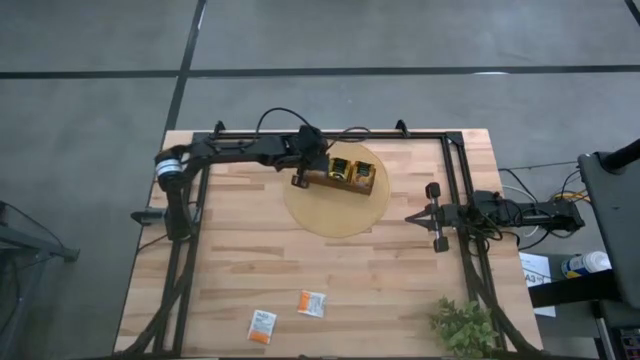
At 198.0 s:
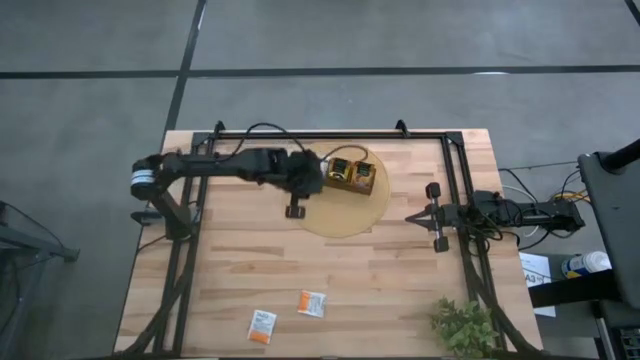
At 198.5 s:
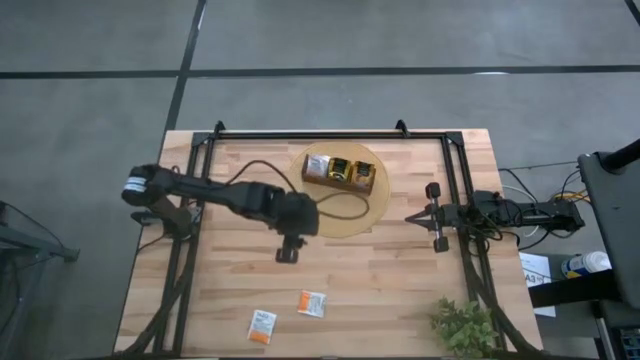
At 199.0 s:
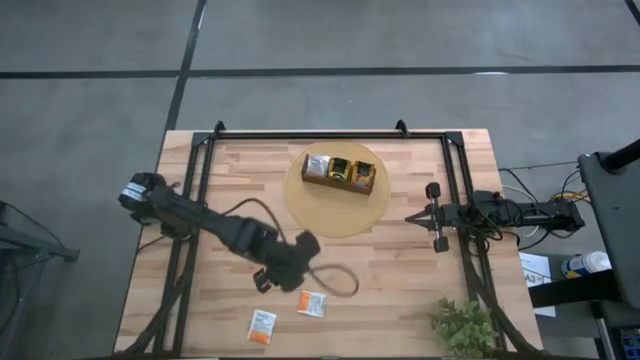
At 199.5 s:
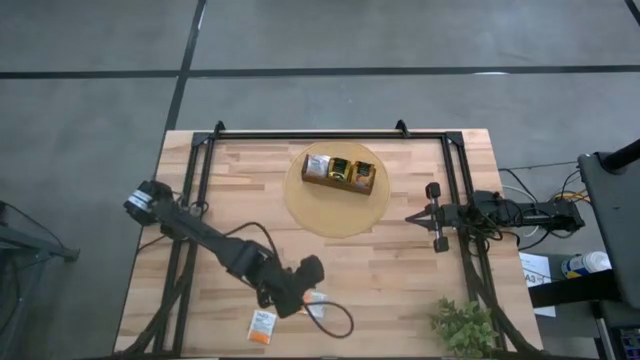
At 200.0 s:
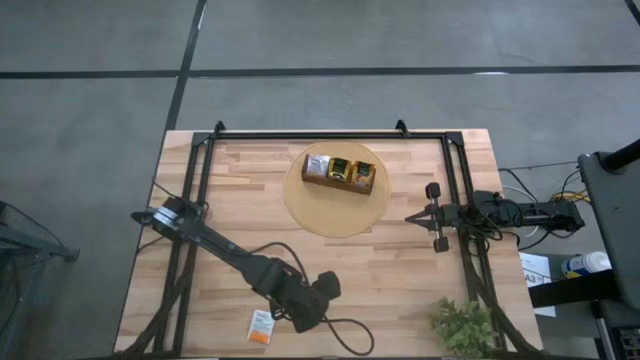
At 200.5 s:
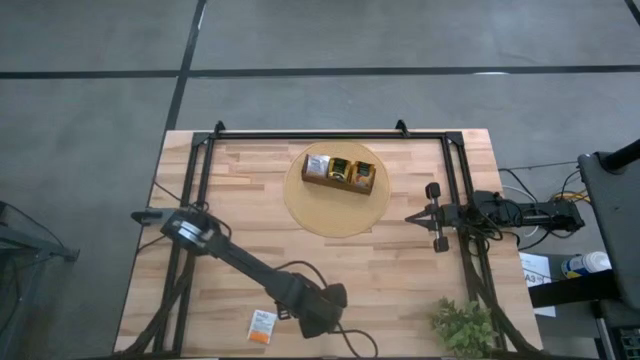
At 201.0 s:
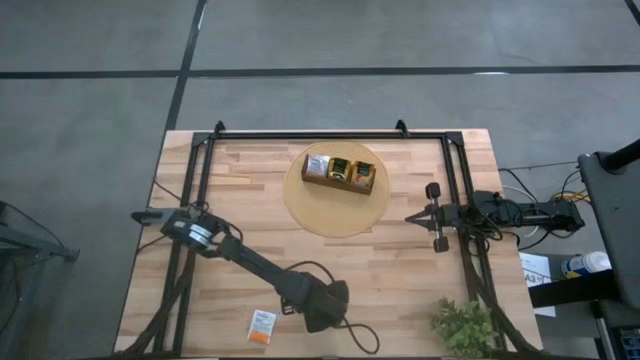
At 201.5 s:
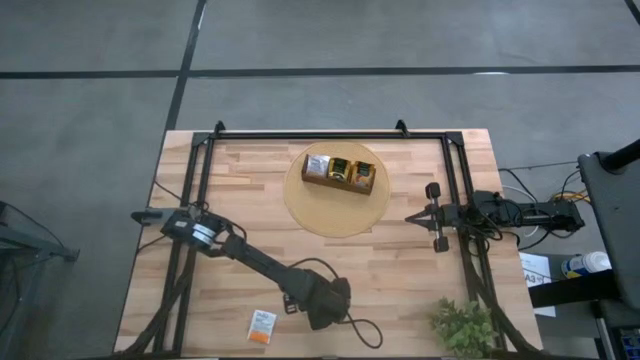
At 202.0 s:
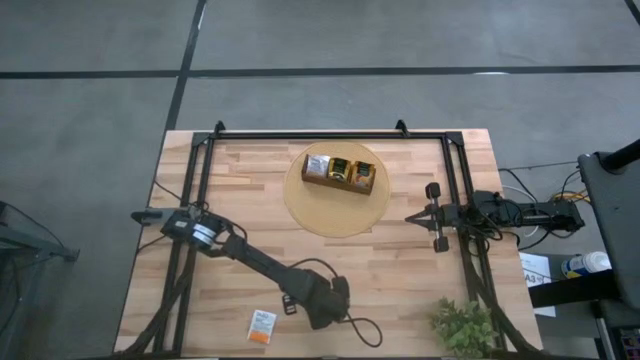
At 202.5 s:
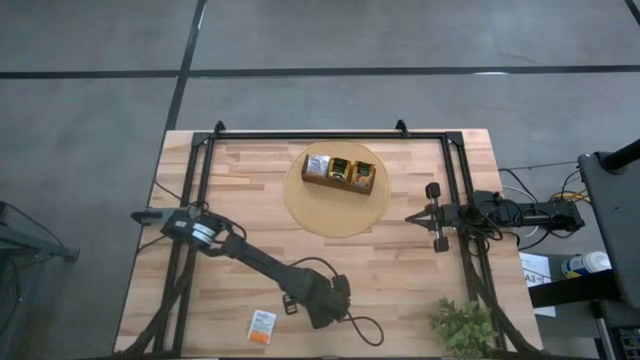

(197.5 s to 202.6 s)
Task: Pick & Place Tea
Put the right white tea bag into the left section of wooden organizer

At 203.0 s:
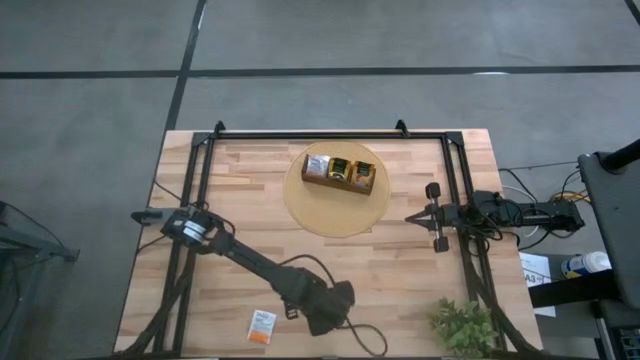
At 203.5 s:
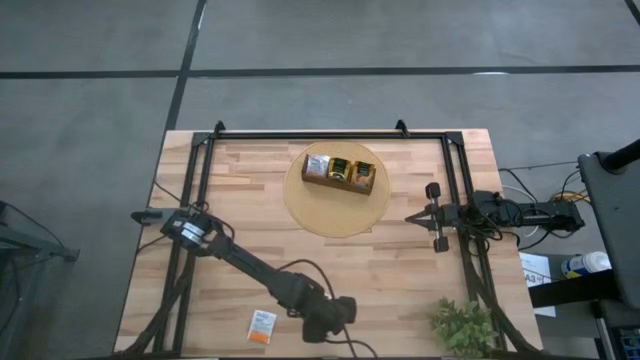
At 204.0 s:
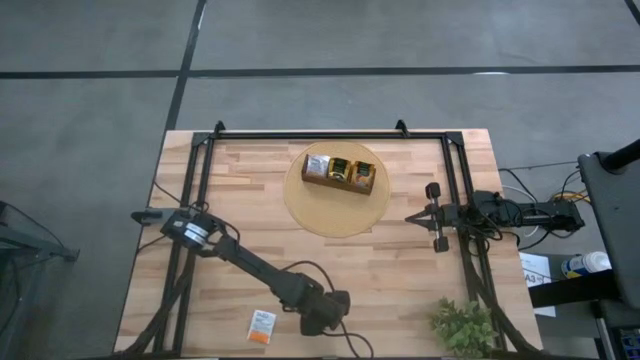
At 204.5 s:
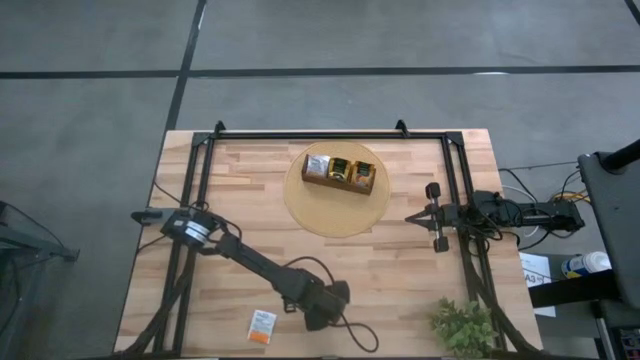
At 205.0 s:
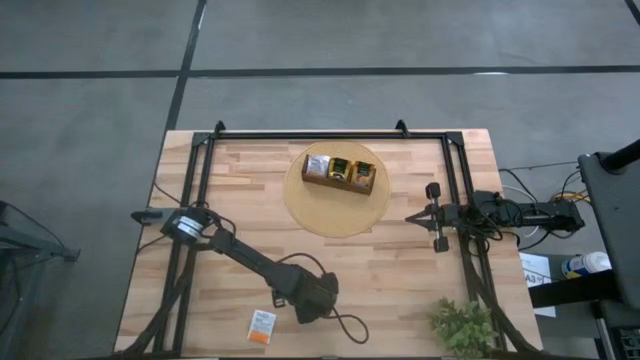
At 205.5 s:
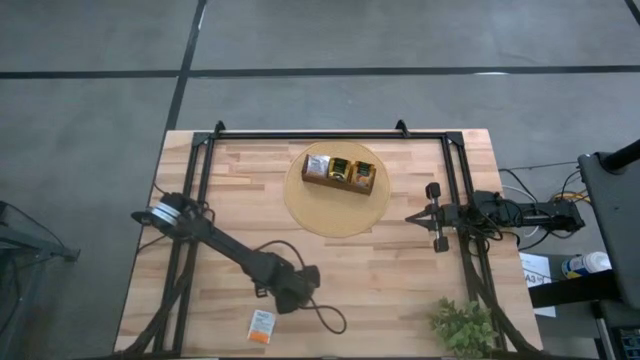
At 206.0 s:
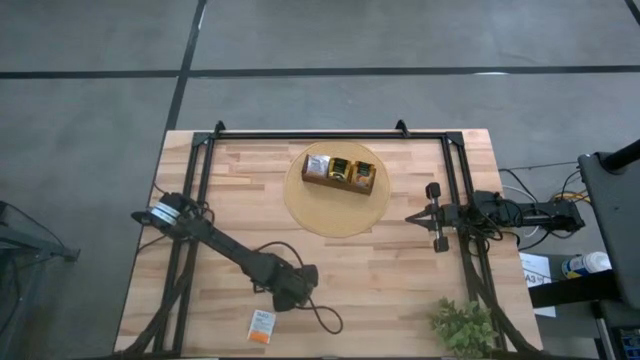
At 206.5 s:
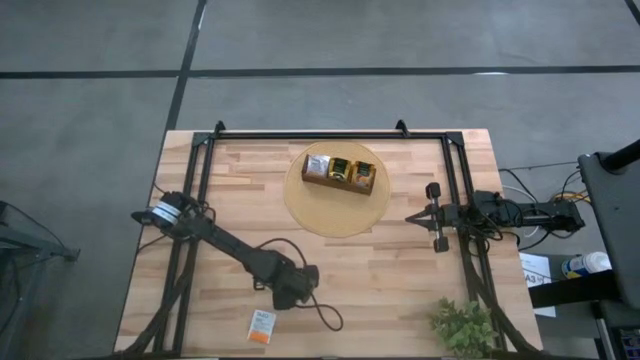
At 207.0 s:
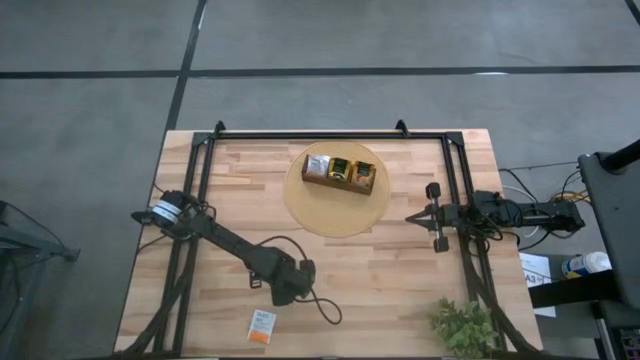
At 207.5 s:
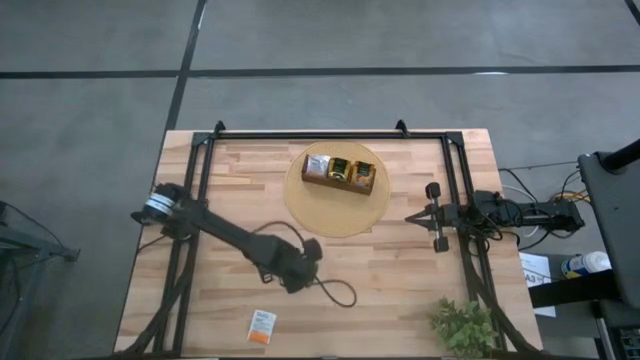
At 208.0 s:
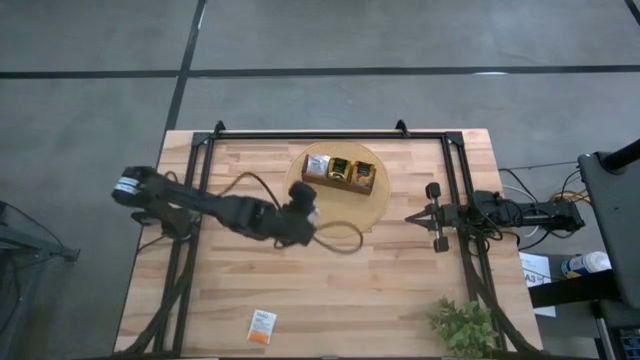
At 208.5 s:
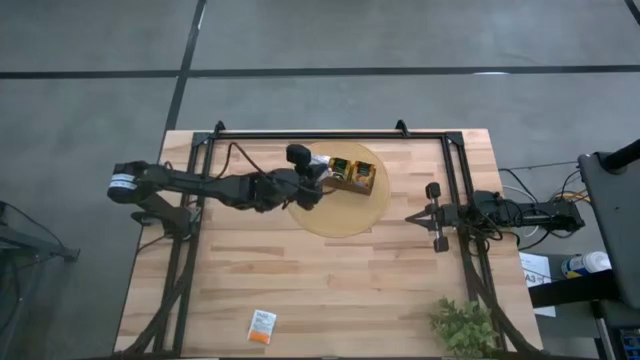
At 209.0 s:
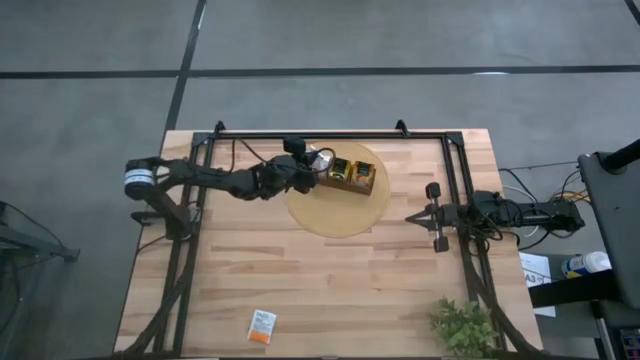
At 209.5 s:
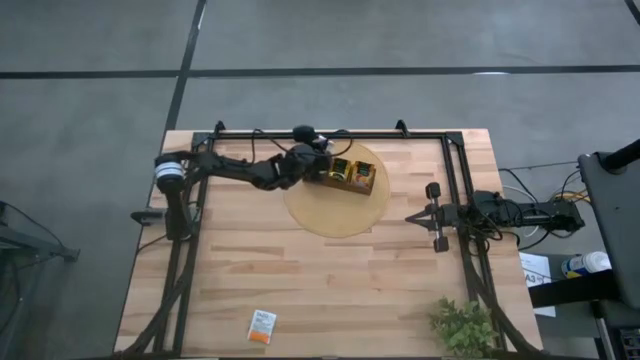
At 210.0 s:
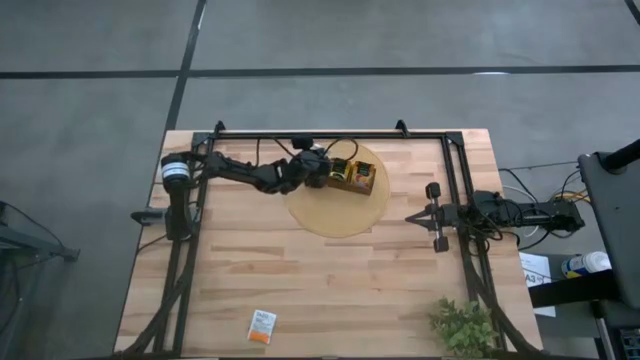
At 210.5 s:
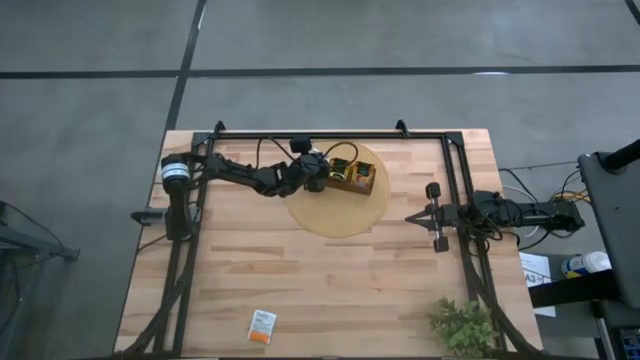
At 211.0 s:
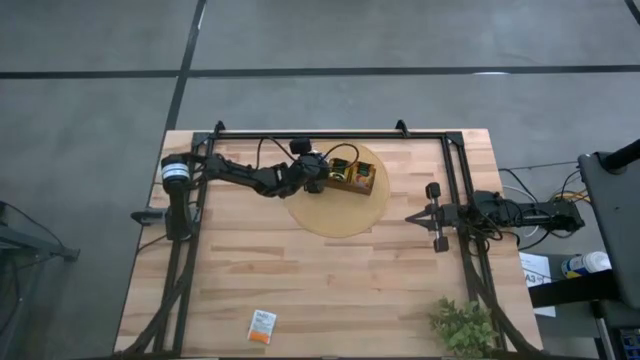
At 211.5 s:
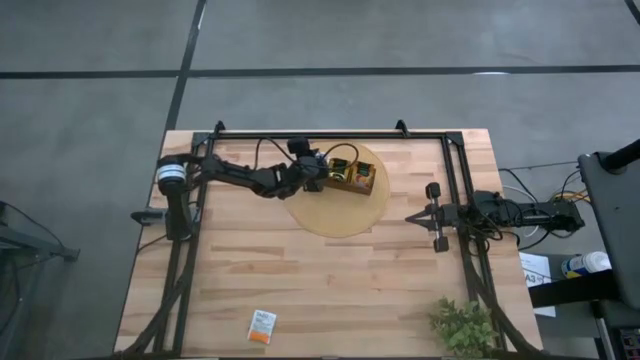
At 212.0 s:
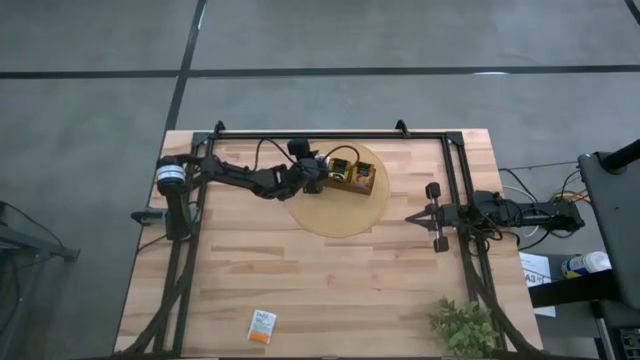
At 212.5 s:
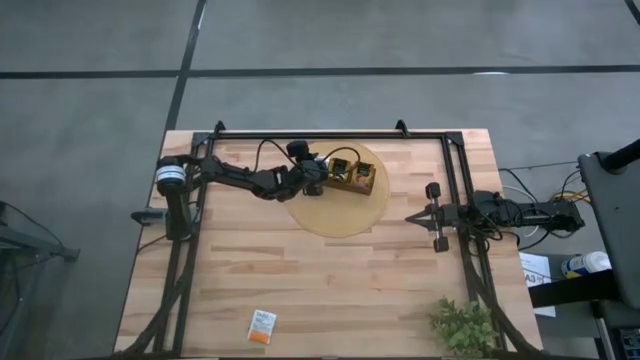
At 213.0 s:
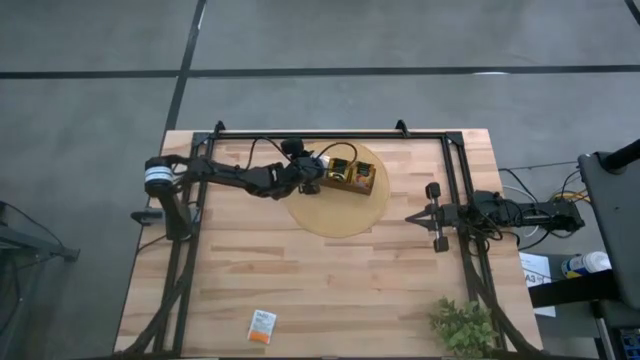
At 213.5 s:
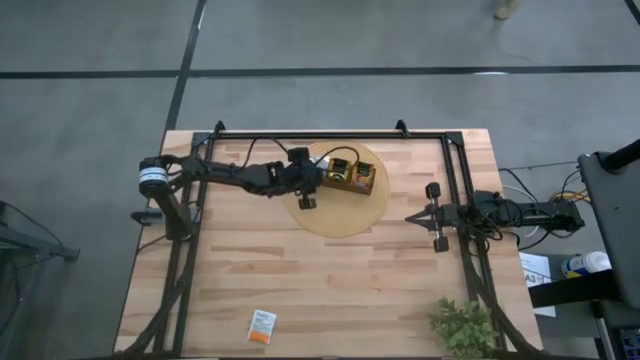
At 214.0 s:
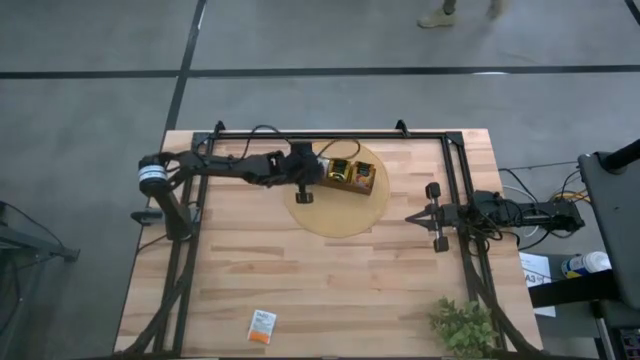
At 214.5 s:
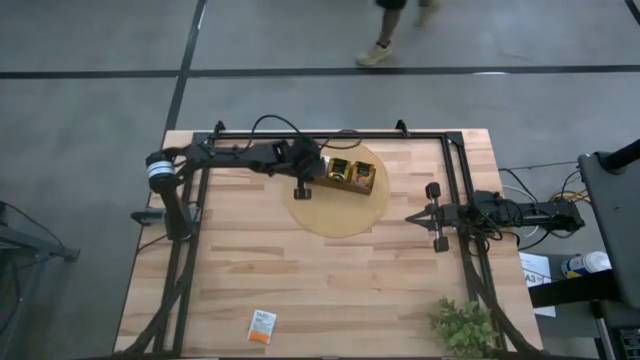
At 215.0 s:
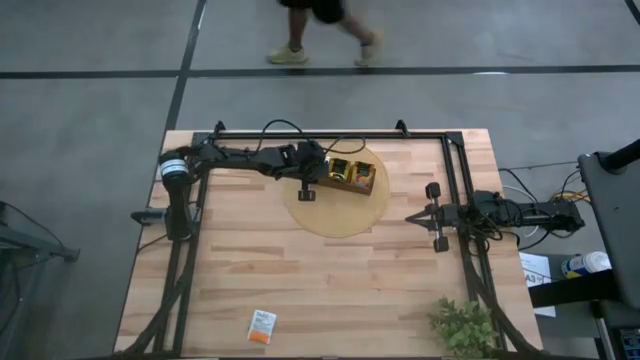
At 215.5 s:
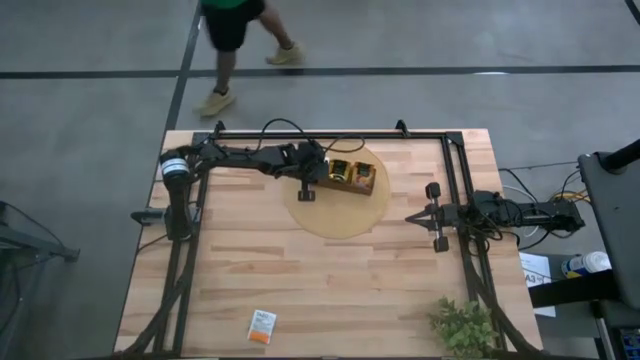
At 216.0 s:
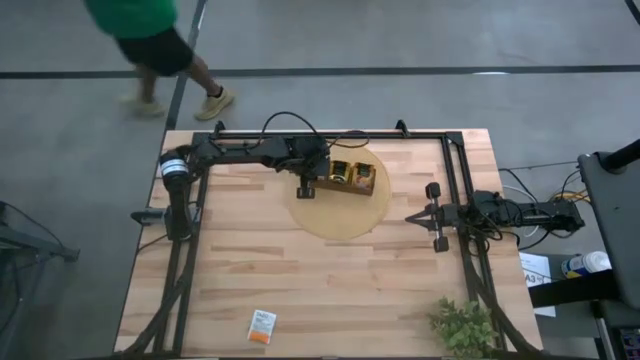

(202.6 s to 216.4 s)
Put the right white tea bag into the left section of wooden organizer

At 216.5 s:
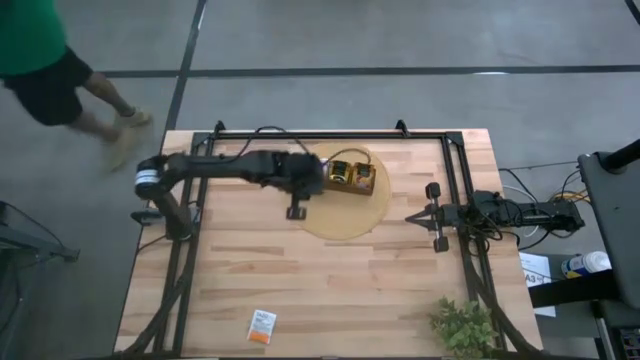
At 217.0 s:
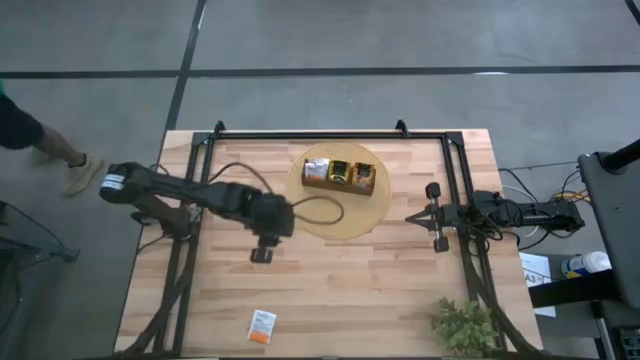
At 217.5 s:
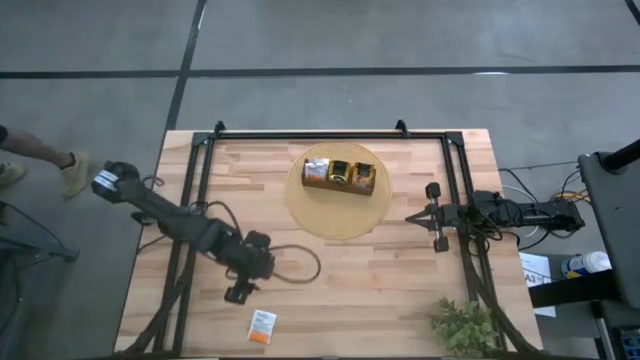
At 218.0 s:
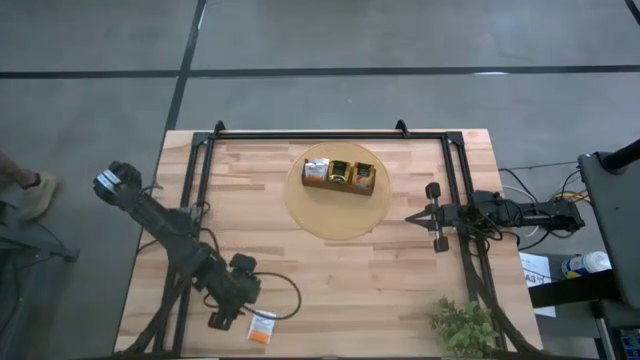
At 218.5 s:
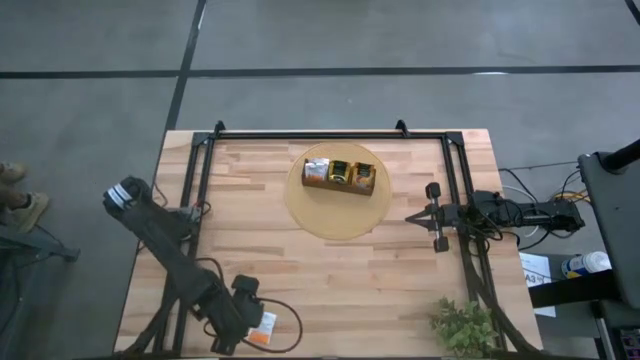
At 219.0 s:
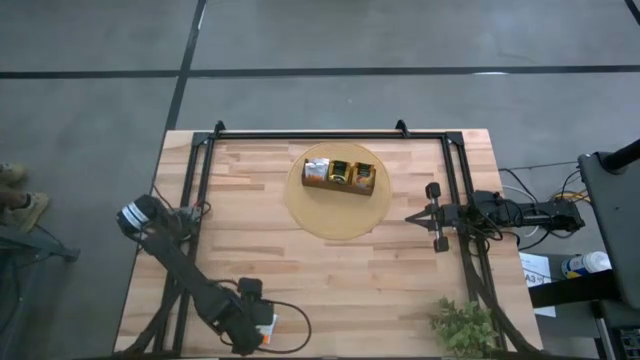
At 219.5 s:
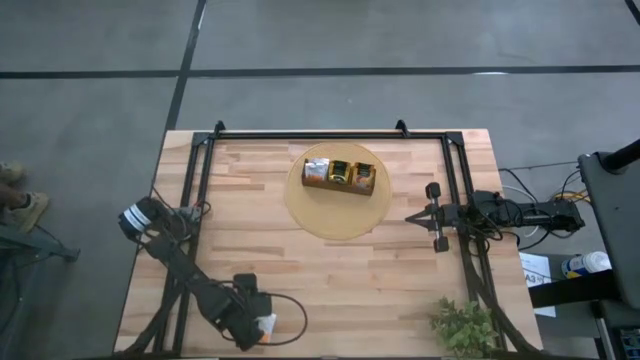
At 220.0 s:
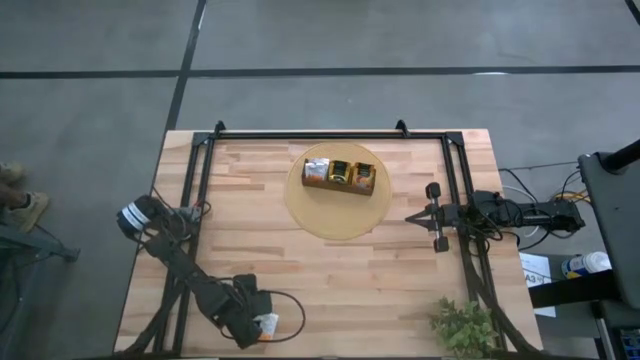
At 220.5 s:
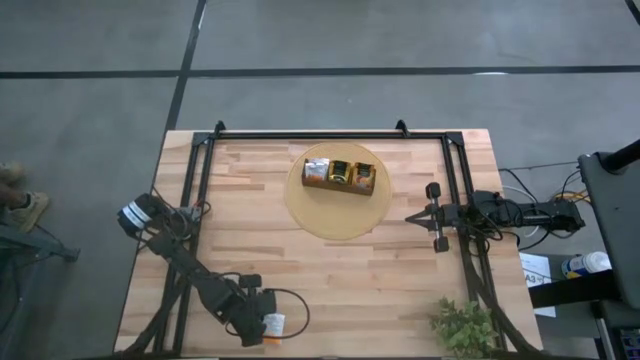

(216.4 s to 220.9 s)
Put the white tea bag into the left section of wooden organizer
